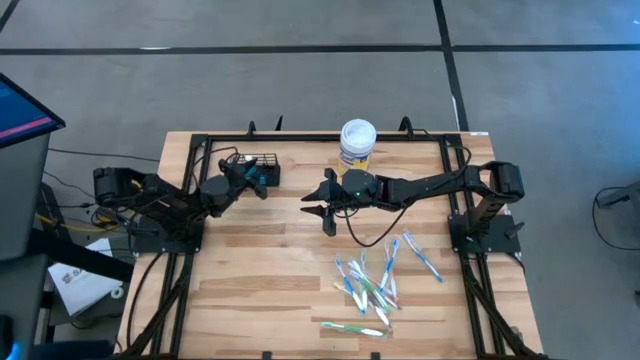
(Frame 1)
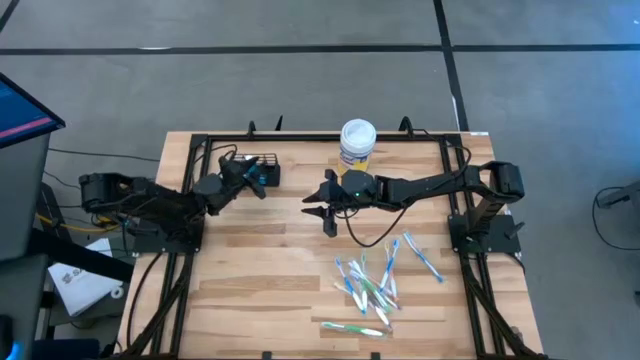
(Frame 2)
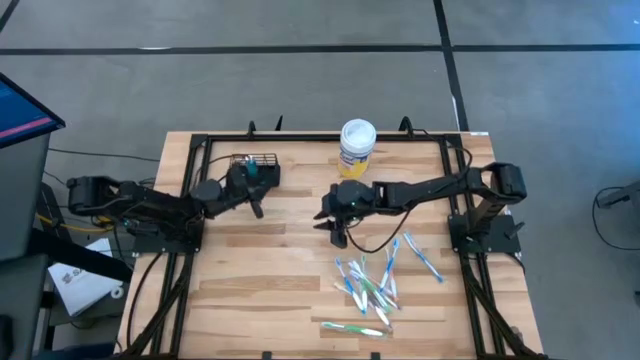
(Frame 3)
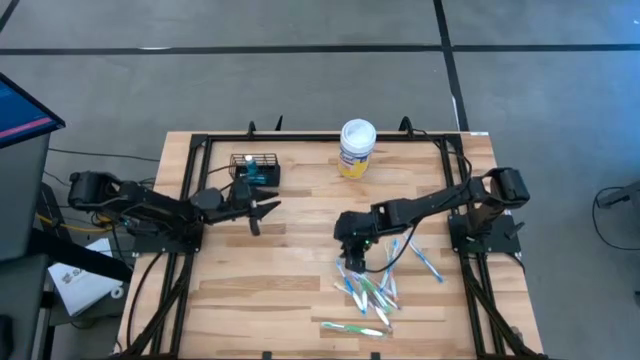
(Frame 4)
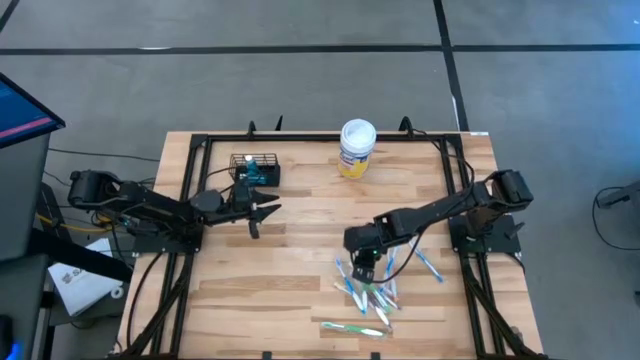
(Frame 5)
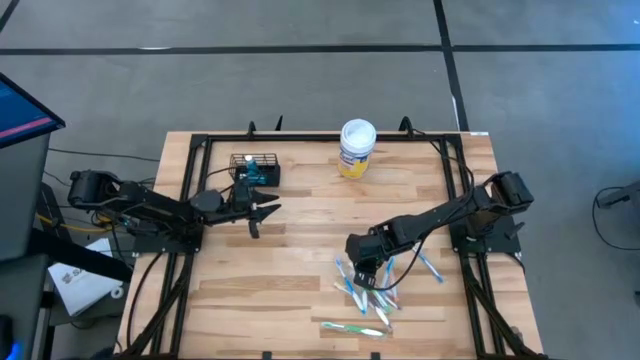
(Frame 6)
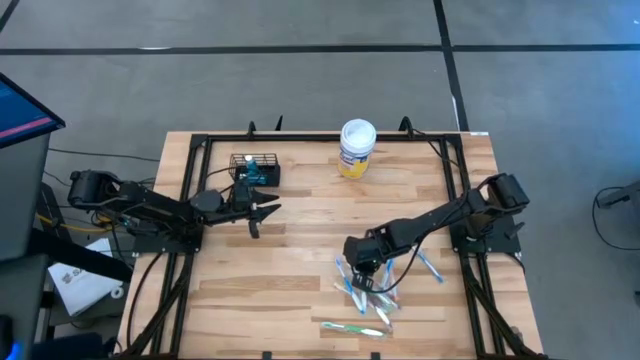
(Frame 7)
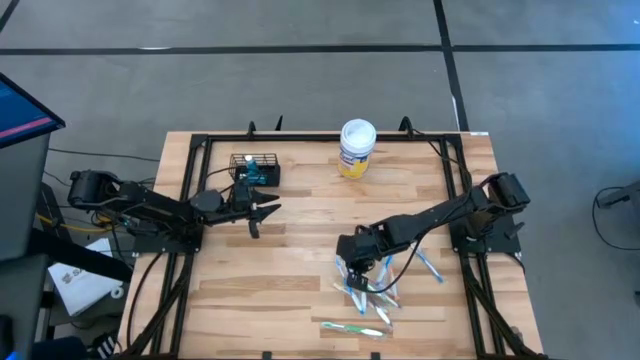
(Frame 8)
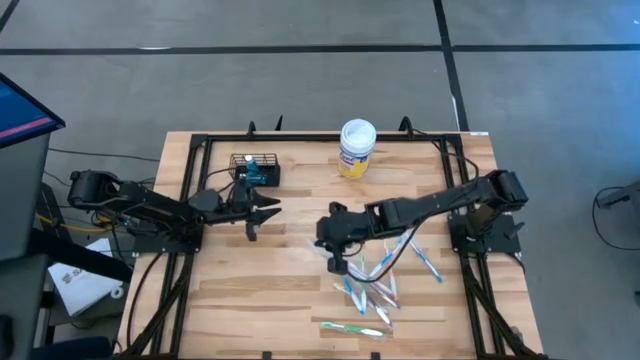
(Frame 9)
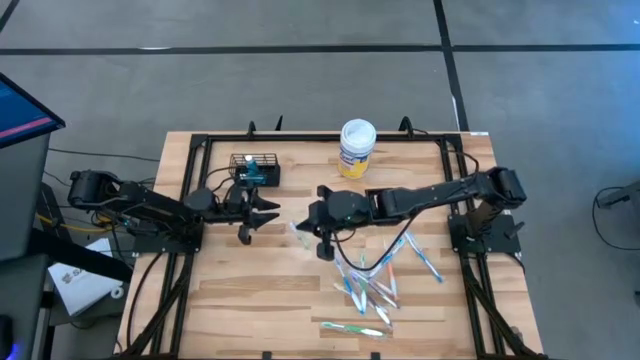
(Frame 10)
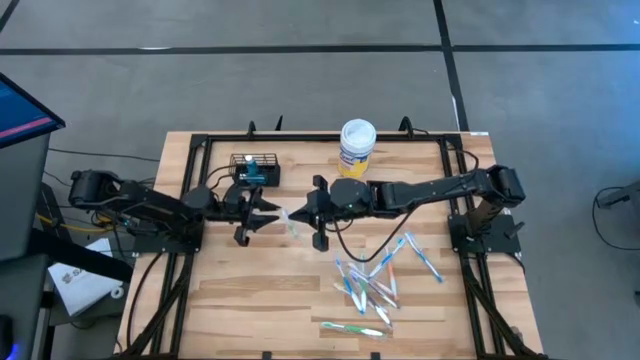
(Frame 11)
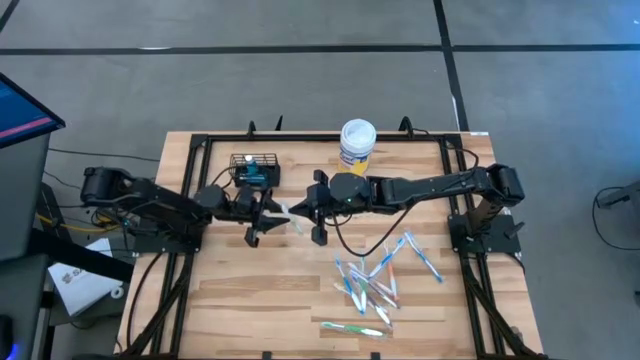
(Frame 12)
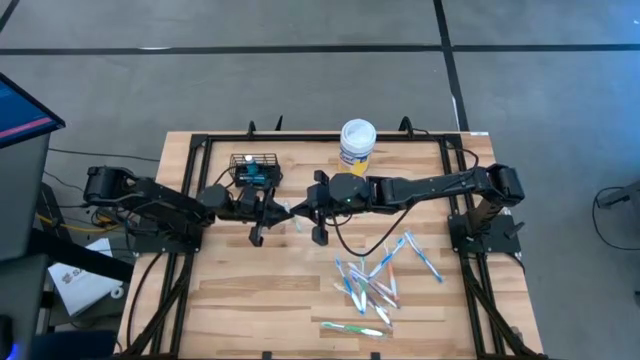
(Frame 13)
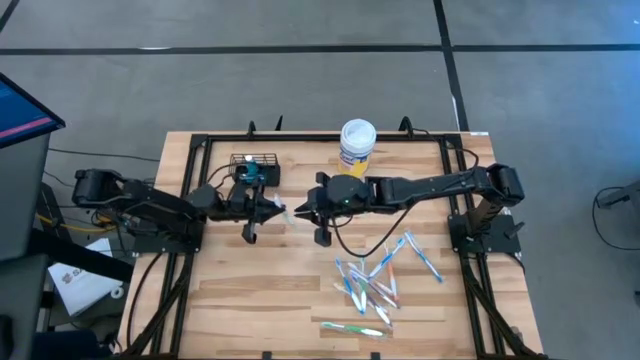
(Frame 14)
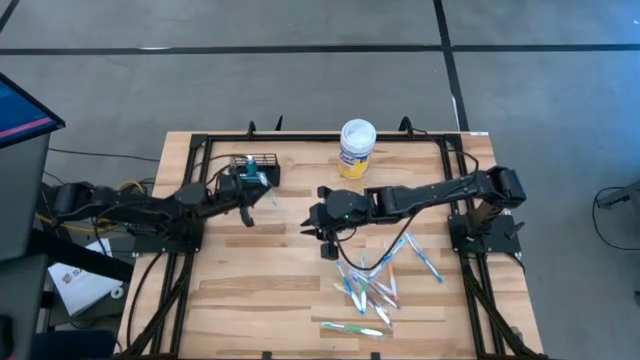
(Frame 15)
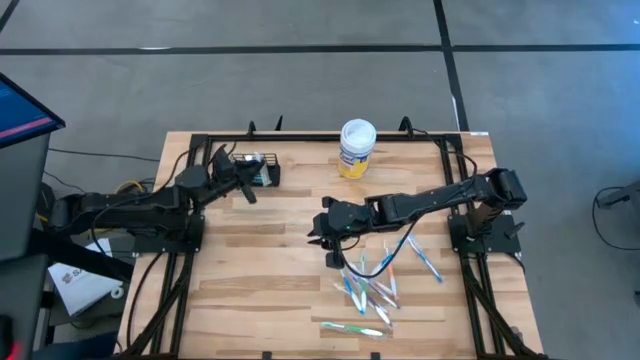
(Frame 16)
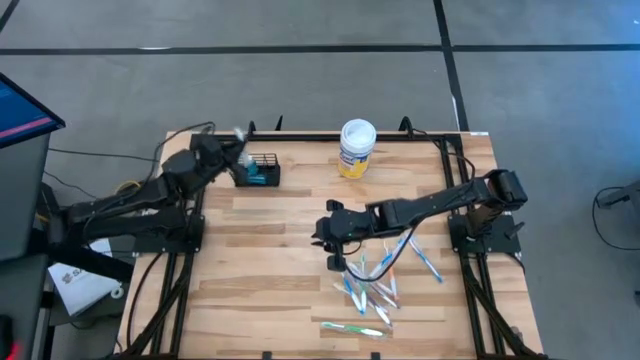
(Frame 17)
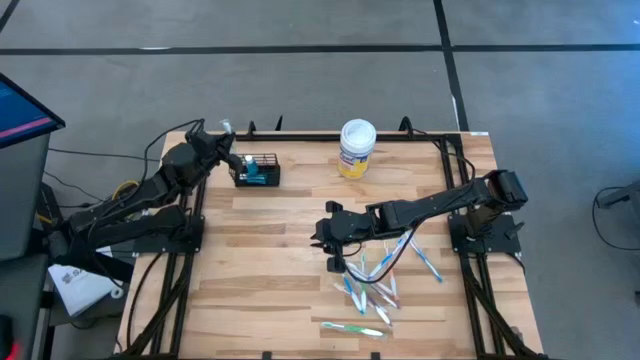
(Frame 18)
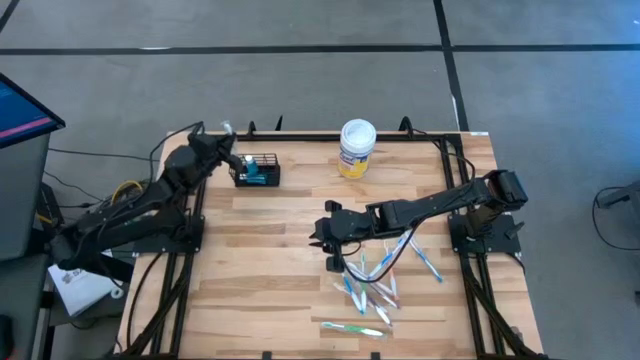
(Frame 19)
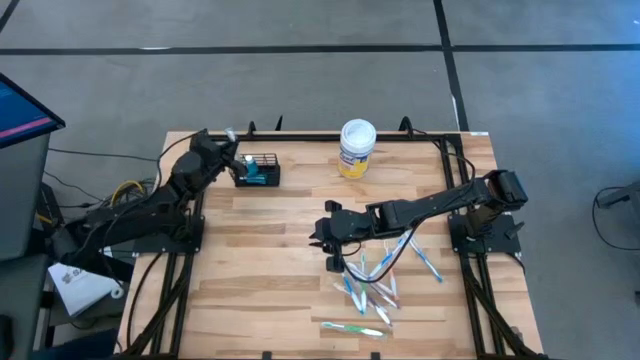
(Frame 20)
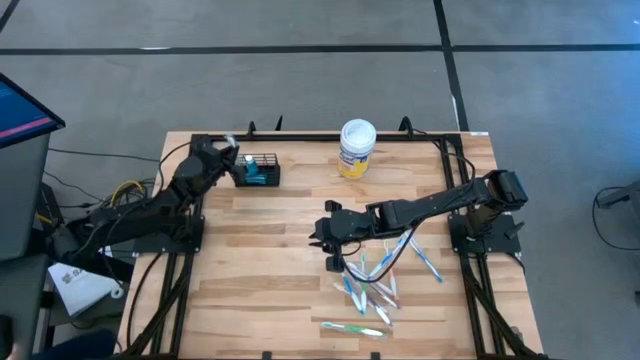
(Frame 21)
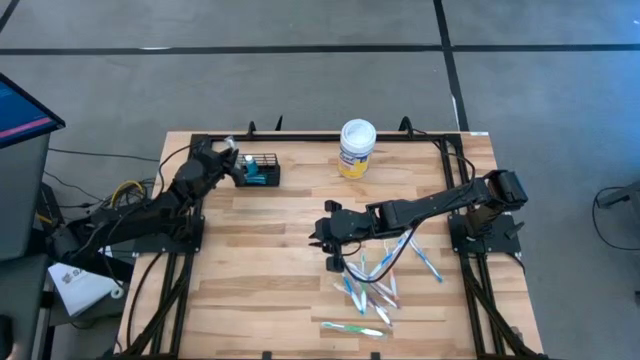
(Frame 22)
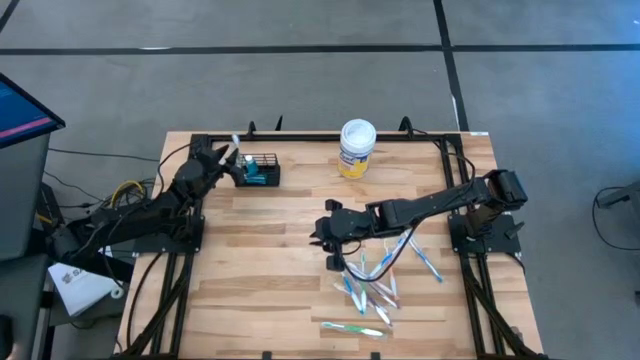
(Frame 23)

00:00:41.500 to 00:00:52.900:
Task: Pick & Place toothbrushing station
Put the top right green toothbrush into the mesh organizer

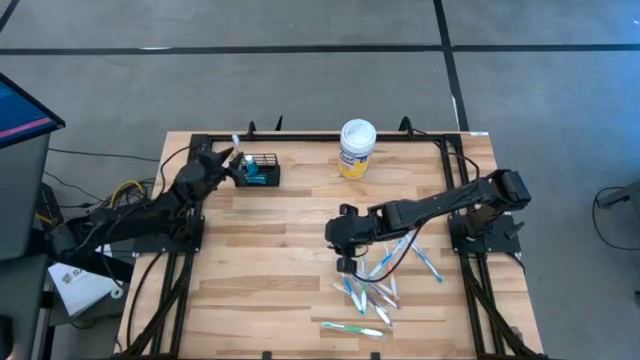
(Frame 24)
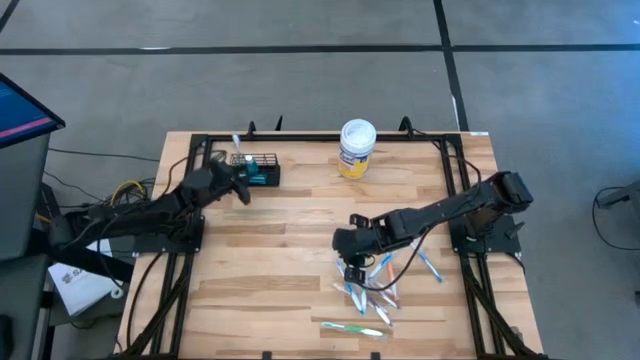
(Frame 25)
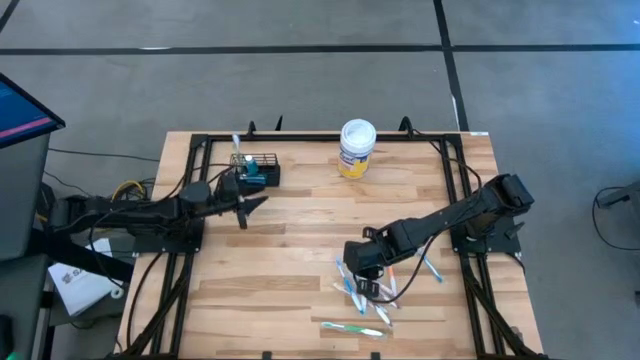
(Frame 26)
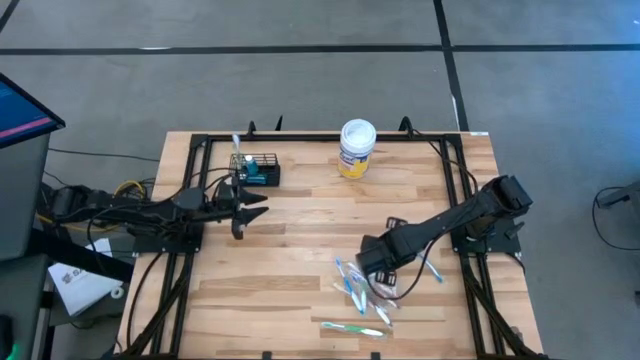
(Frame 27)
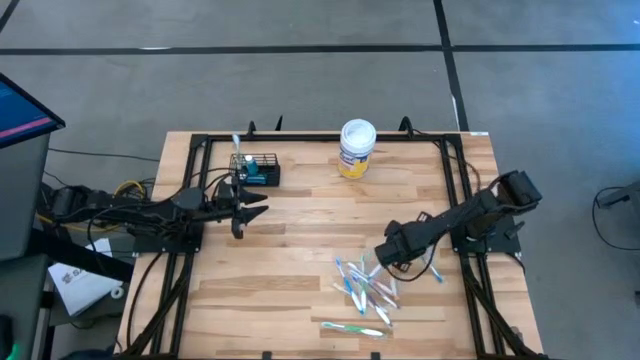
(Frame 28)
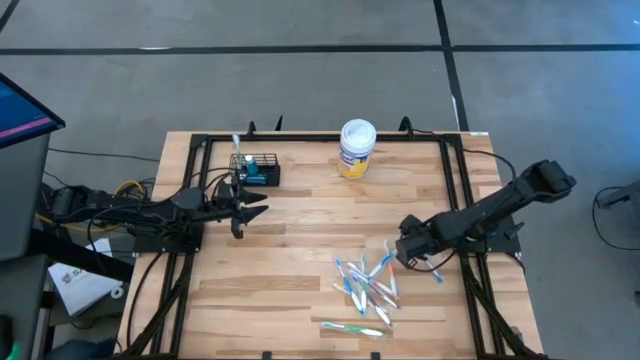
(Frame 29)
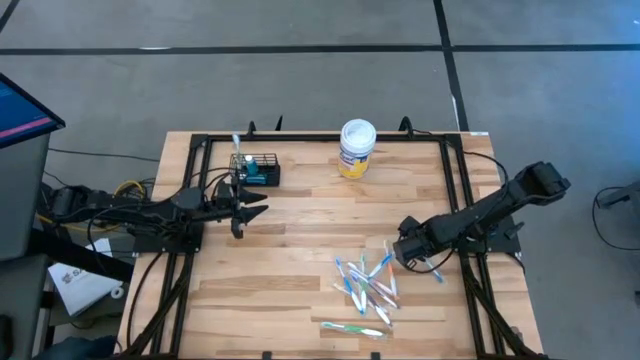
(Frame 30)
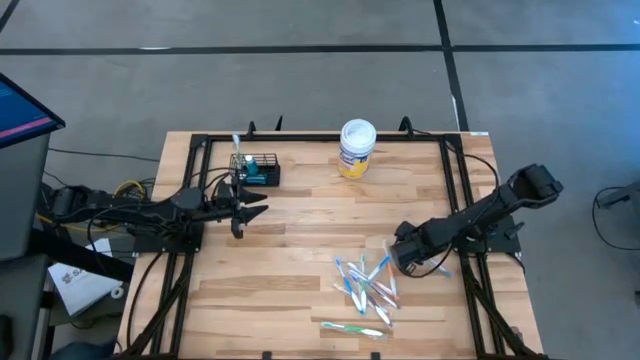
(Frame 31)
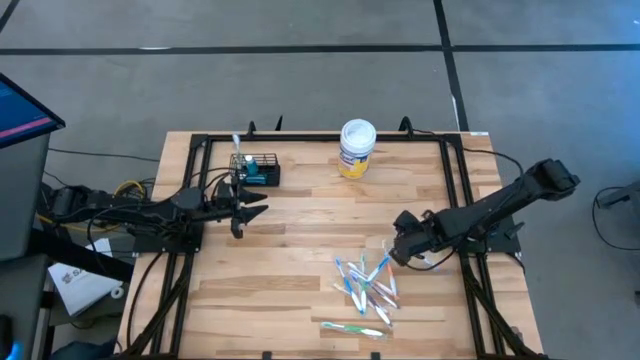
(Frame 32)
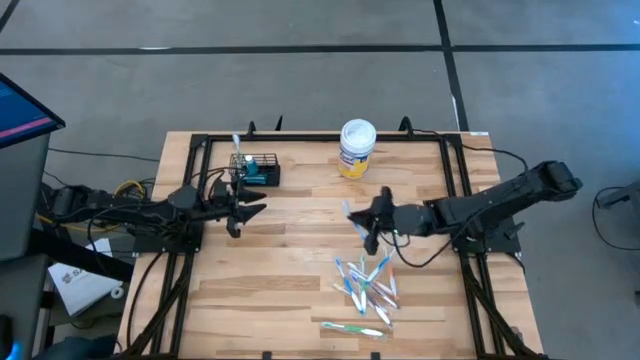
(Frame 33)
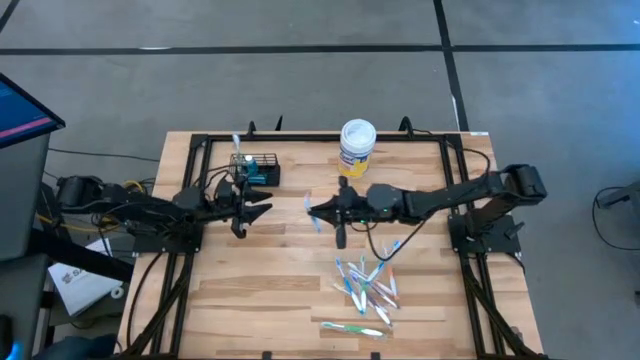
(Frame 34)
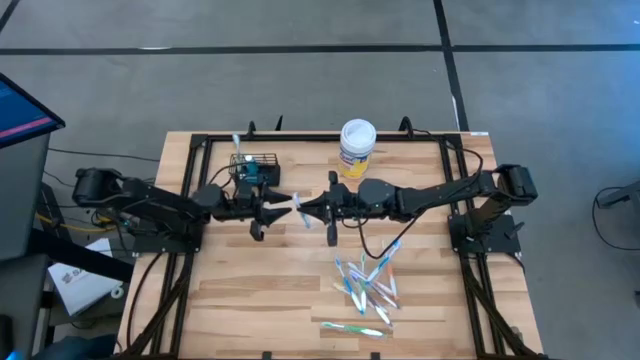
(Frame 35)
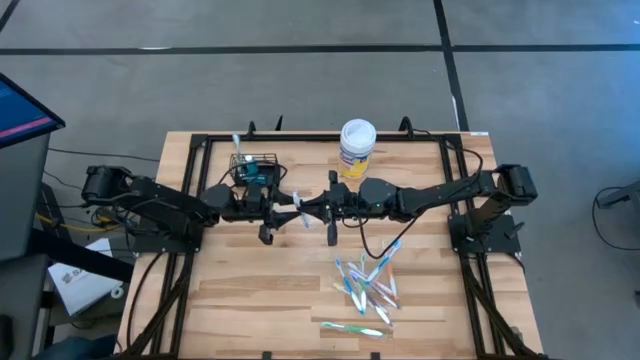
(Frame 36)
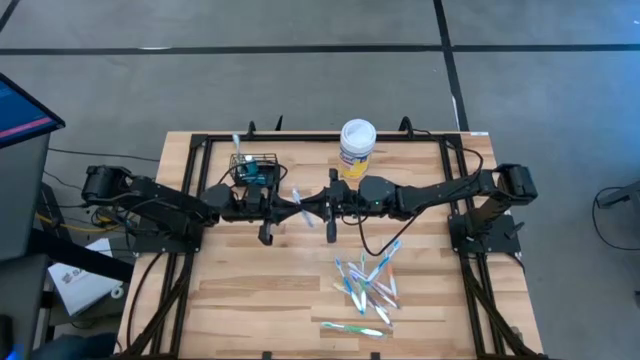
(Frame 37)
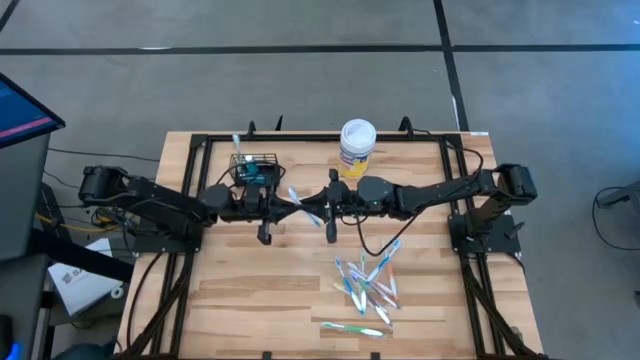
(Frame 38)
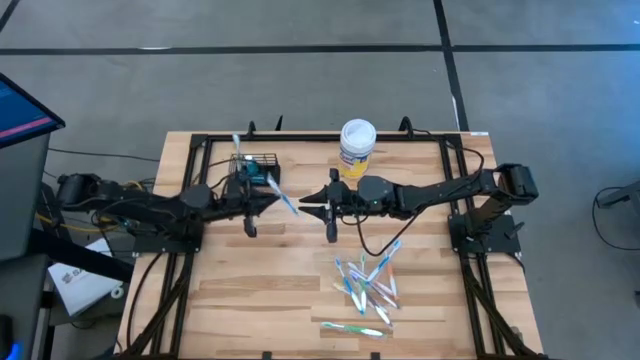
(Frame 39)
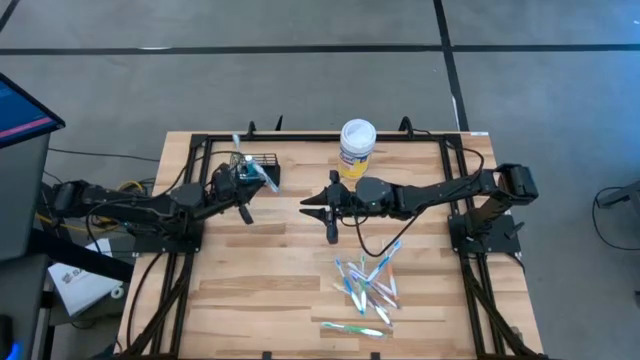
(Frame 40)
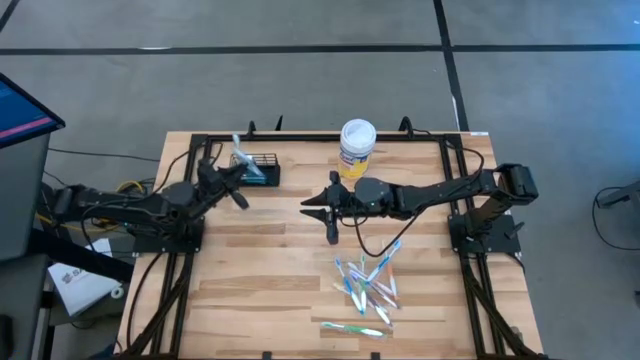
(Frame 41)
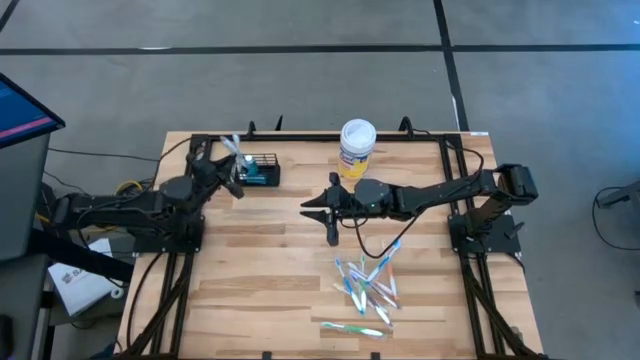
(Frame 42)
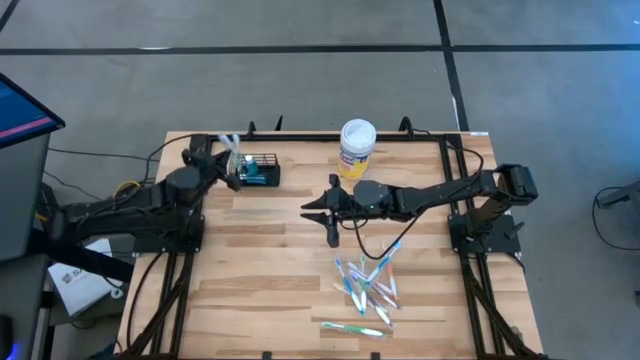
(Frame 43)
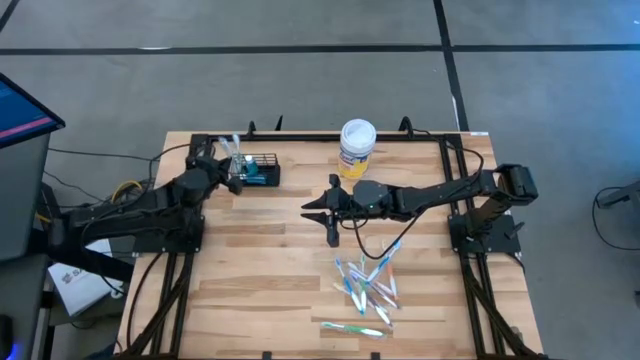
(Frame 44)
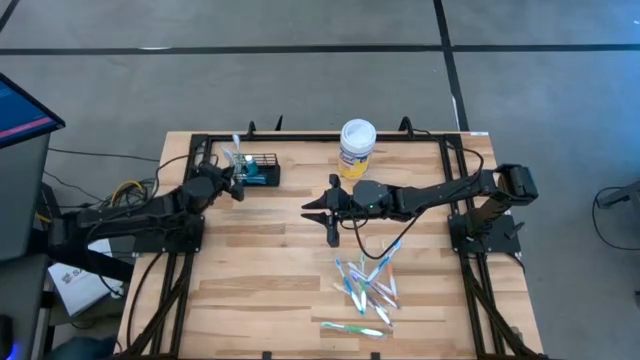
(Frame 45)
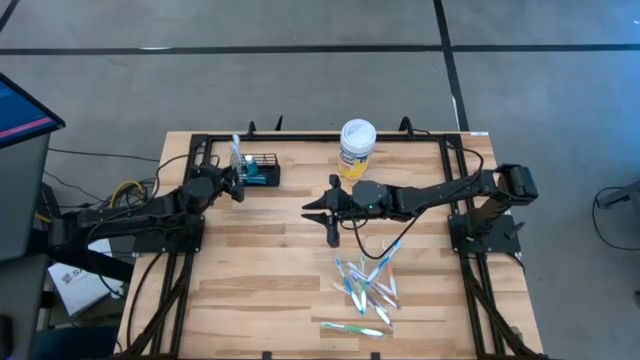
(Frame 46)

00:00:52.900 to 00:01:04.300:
Put the right blue toothbrush into the mesh organizer
